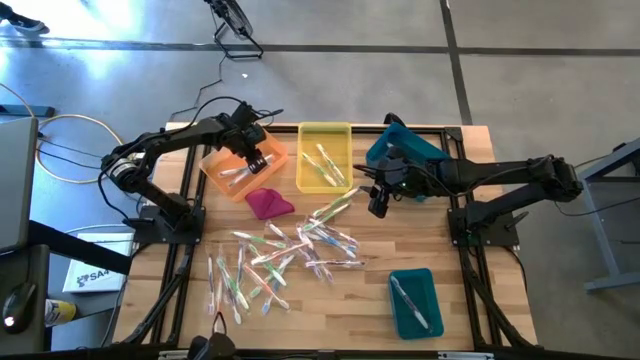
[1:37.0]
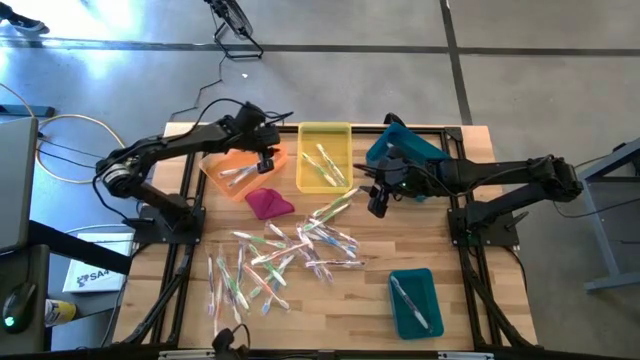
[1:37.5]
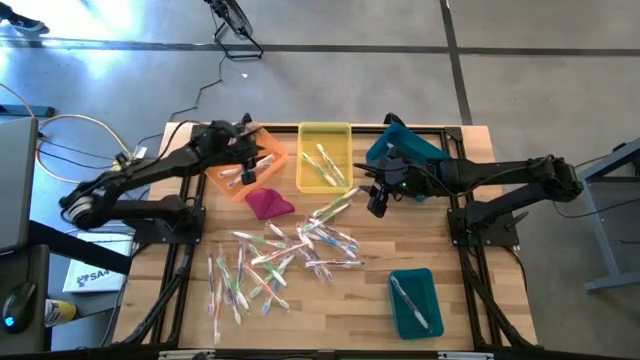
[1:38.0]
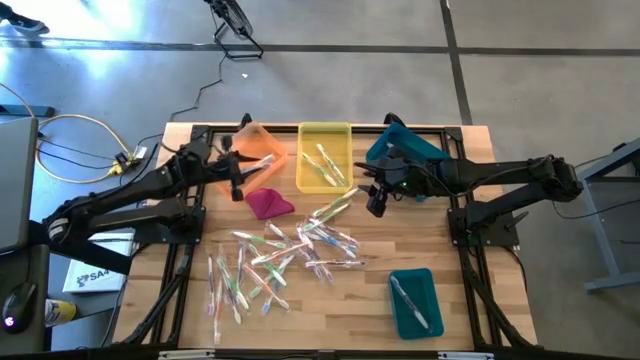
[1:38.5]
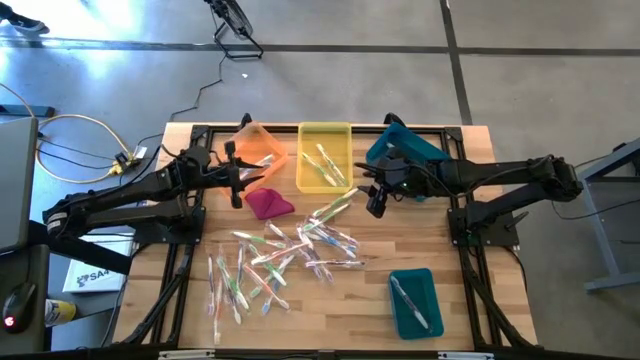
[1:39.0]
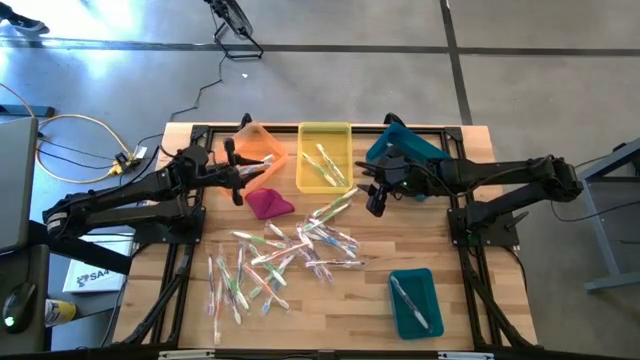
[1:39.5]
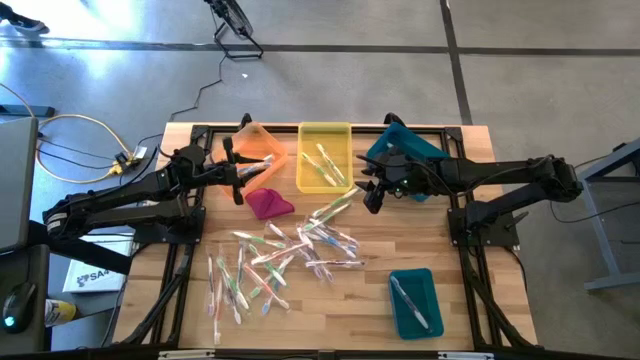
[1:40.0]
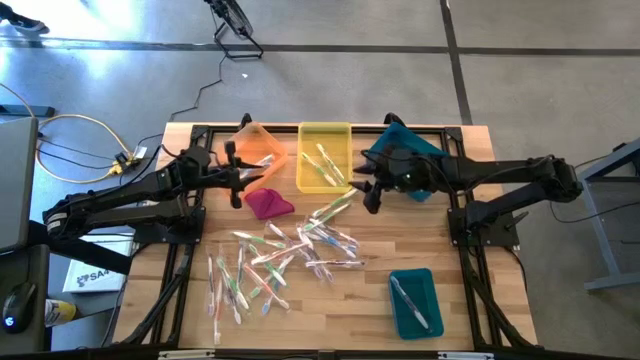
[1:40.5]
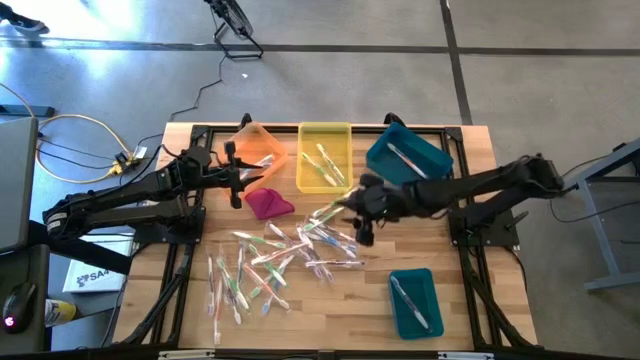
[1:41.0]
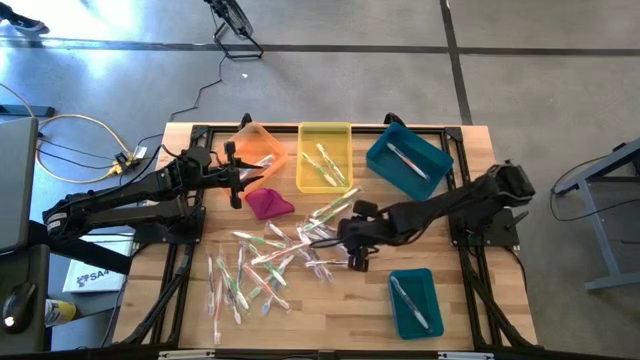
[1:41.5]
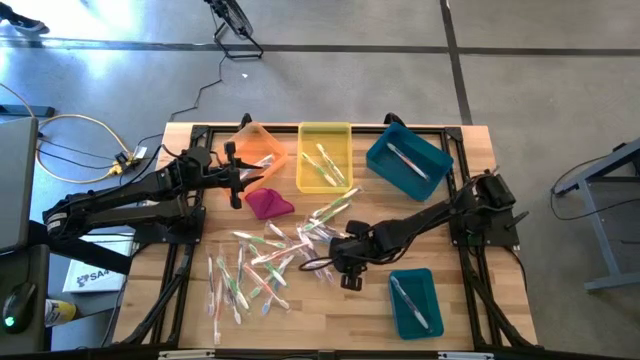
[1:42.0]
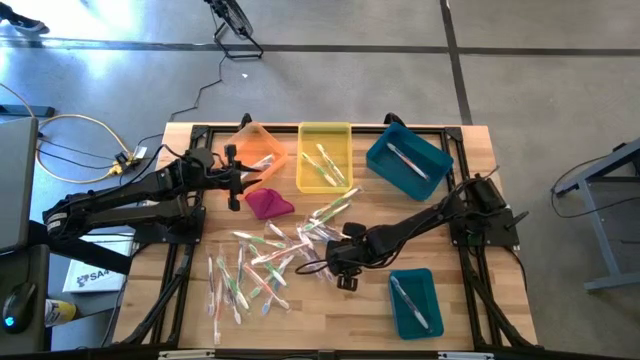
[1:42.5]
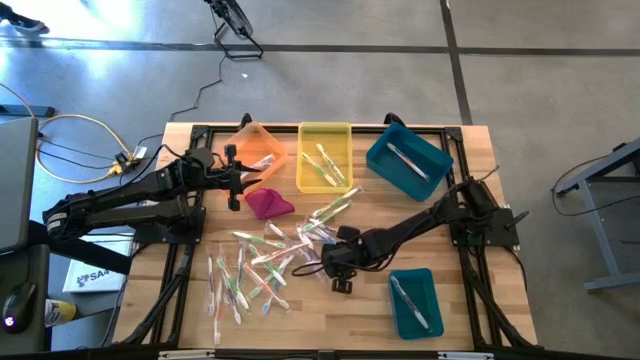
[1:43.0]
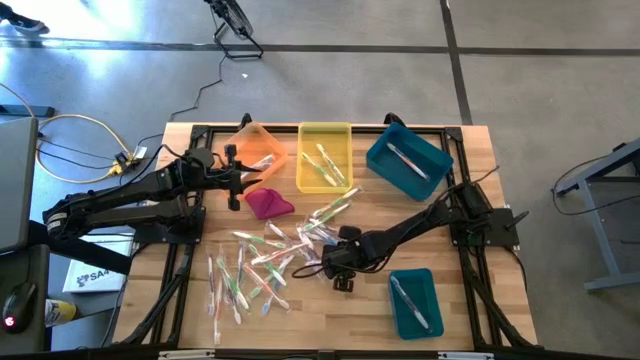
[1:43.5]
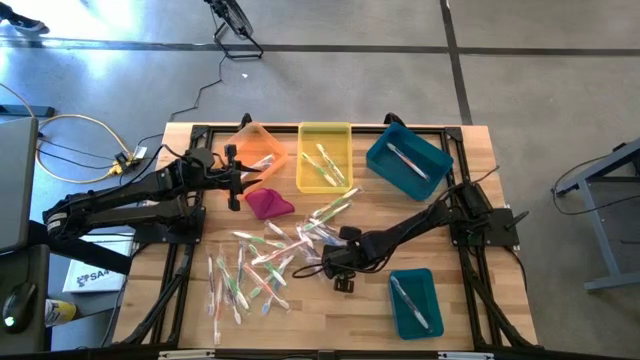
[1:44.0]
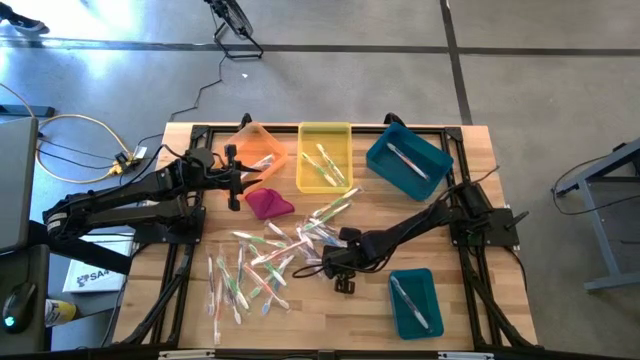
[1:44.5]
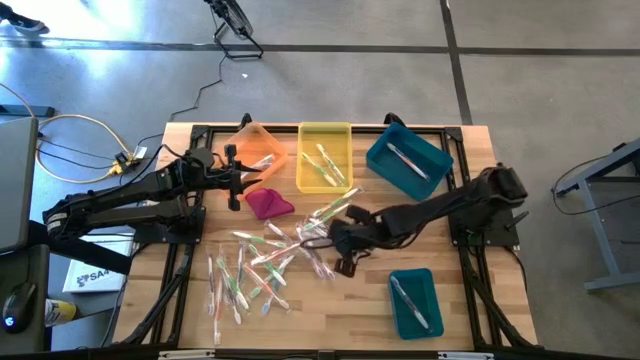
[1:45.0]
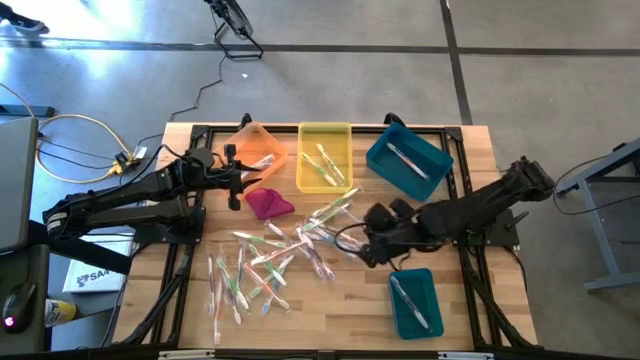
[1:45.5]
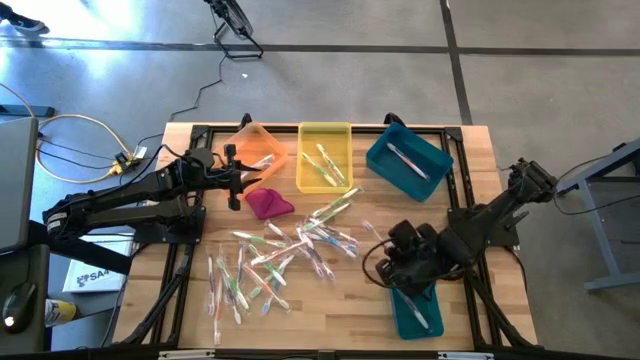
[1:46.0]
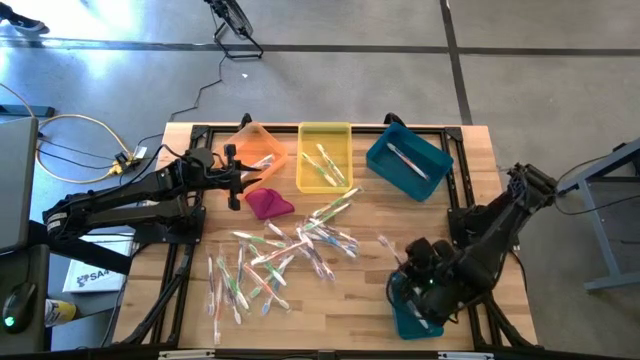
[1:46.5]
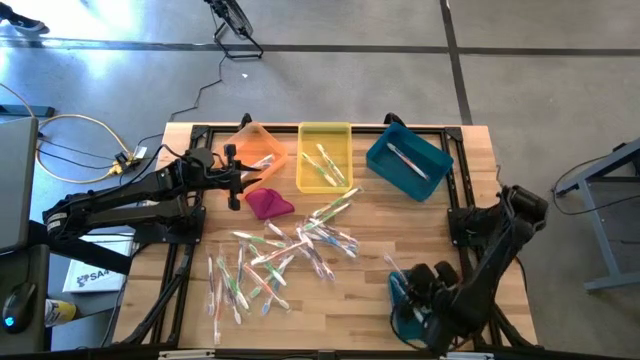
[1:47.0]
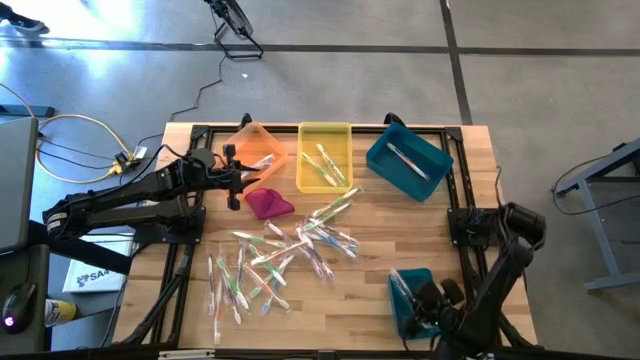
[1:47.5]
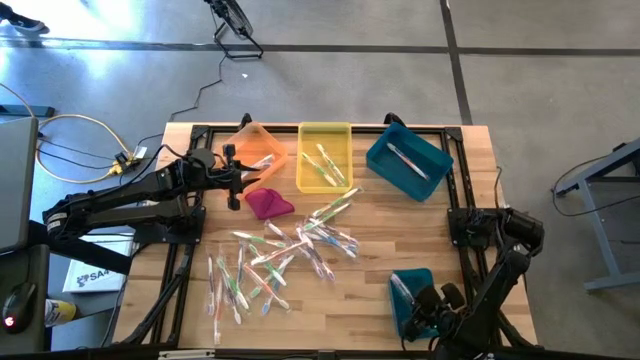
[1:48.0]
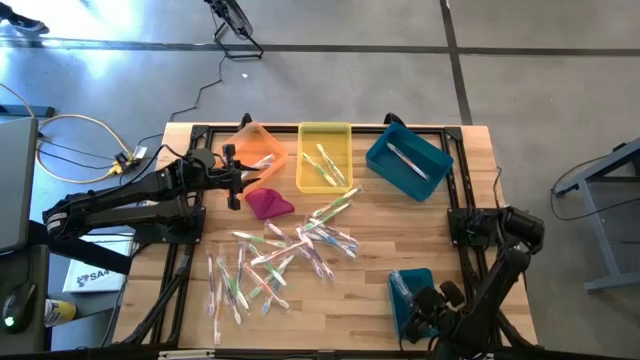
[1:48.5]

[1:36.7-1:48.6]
Task: Pick & Place Toothbrushes
Put the purple toothbrush into the bottom blue bin

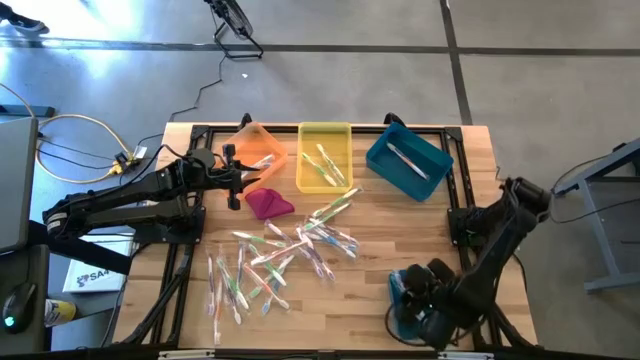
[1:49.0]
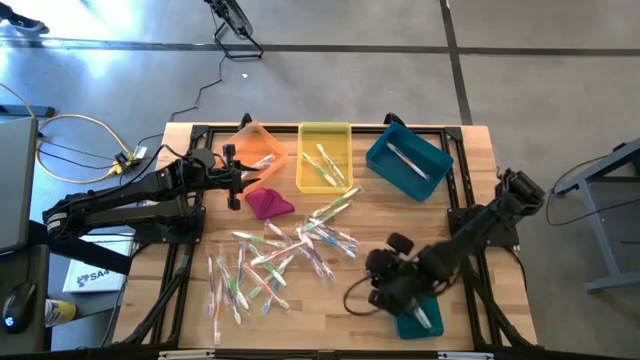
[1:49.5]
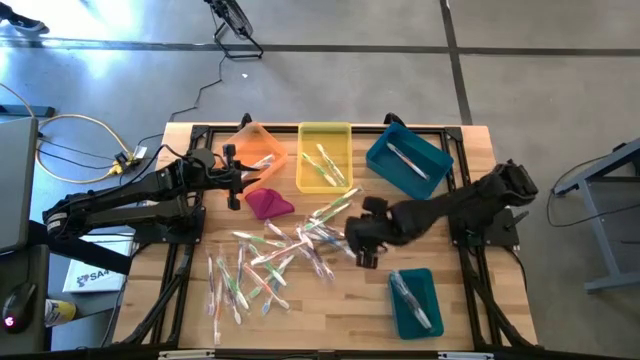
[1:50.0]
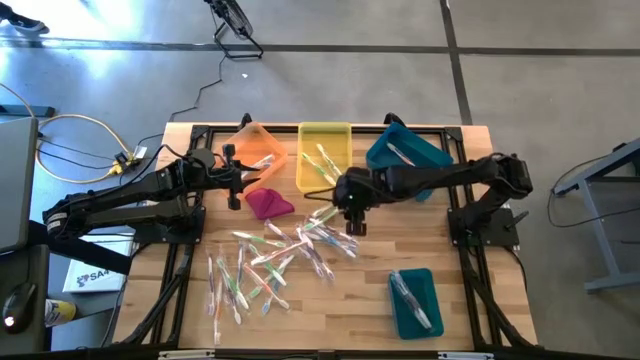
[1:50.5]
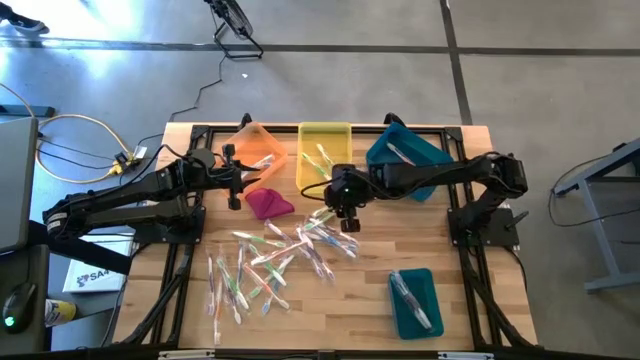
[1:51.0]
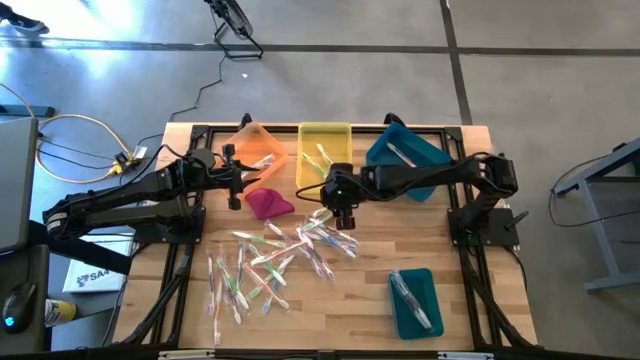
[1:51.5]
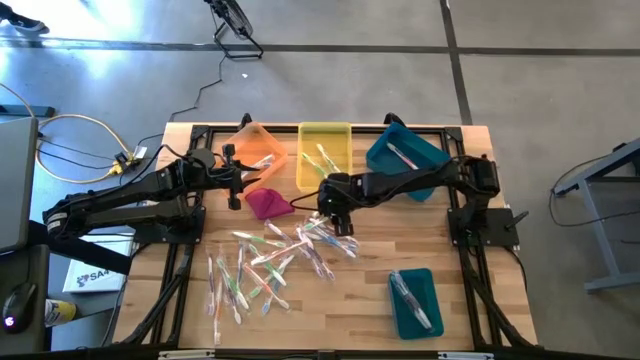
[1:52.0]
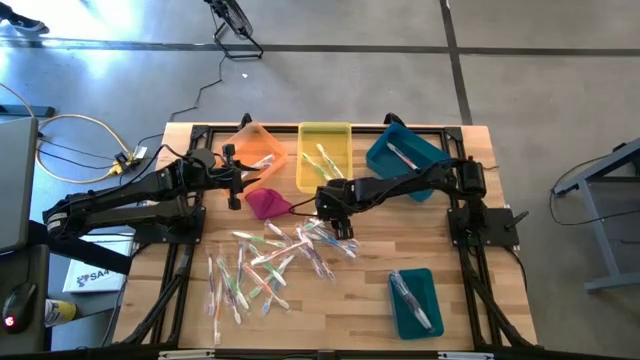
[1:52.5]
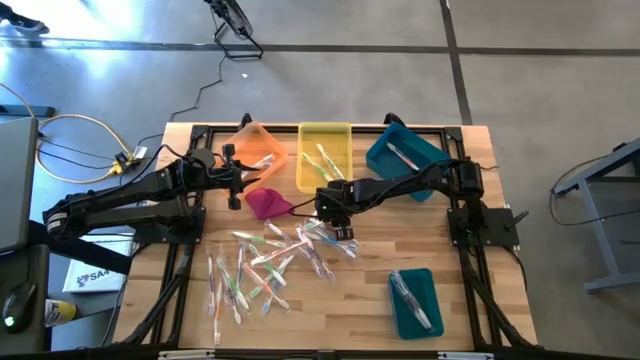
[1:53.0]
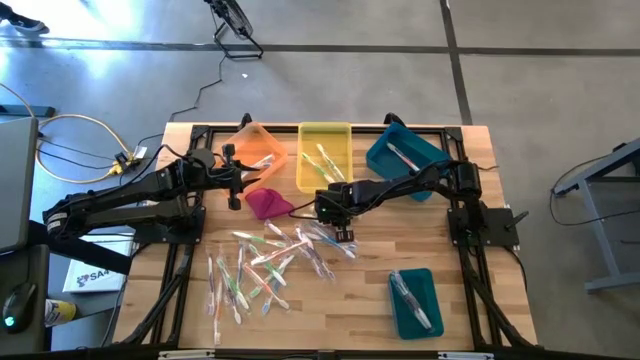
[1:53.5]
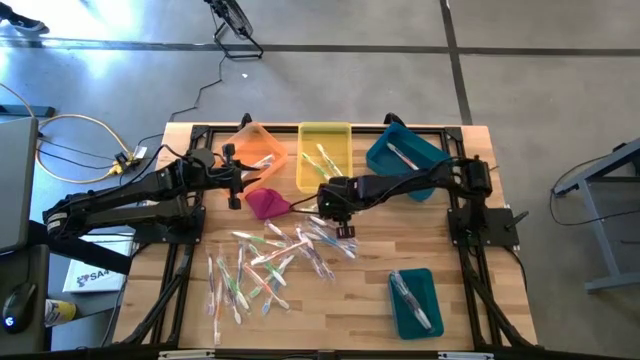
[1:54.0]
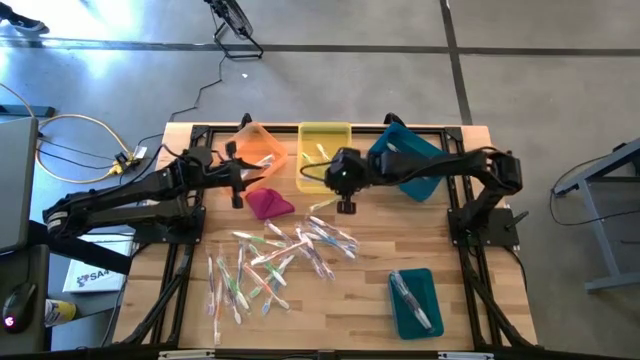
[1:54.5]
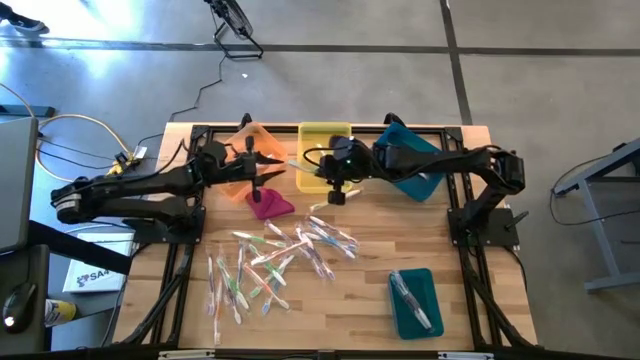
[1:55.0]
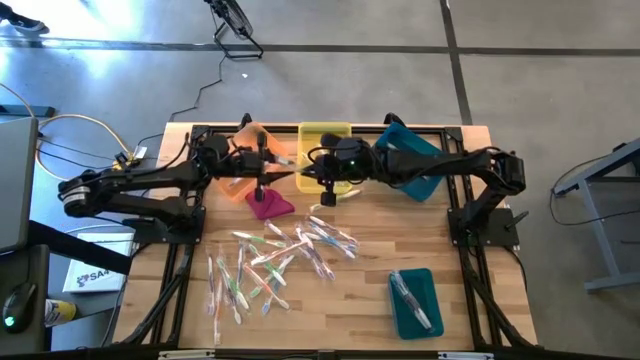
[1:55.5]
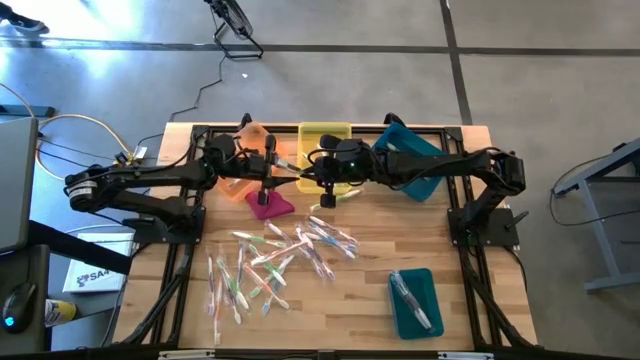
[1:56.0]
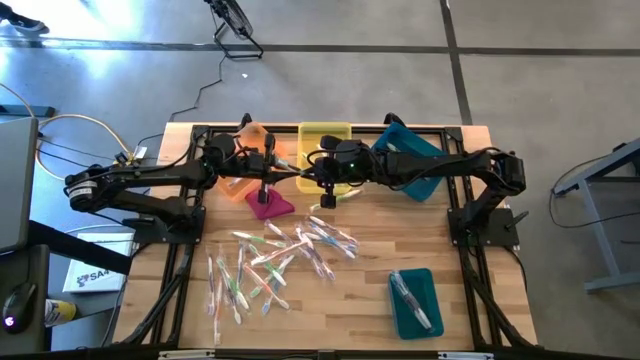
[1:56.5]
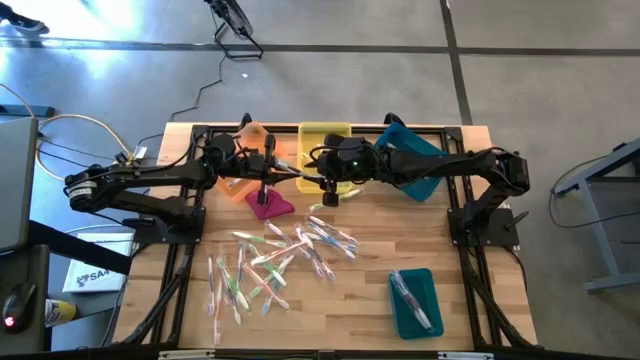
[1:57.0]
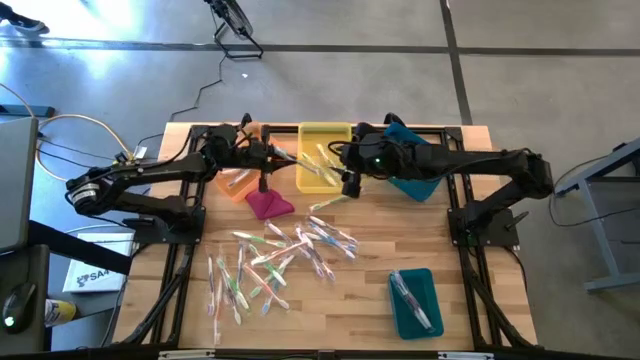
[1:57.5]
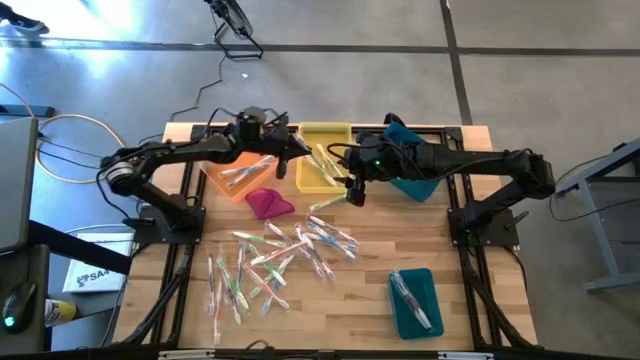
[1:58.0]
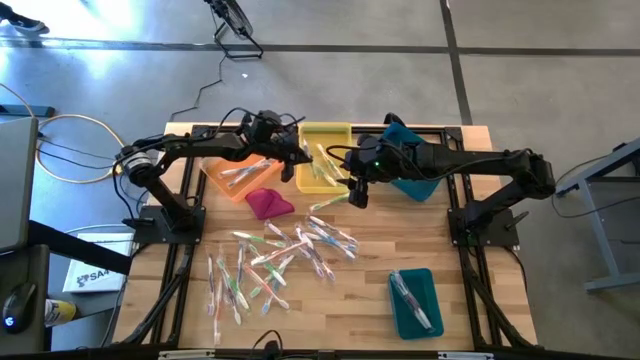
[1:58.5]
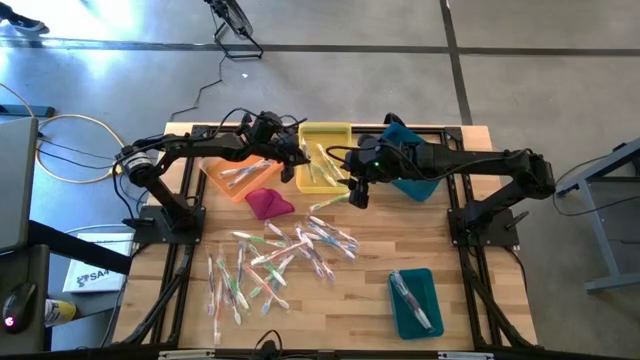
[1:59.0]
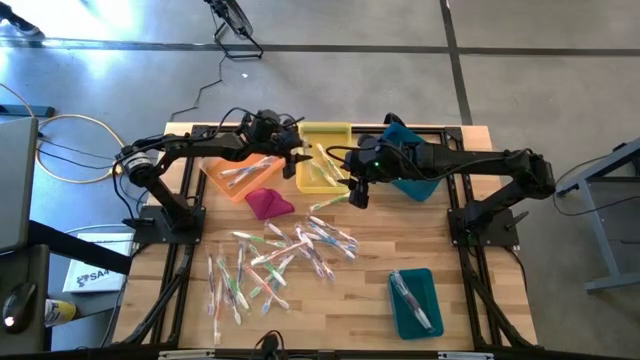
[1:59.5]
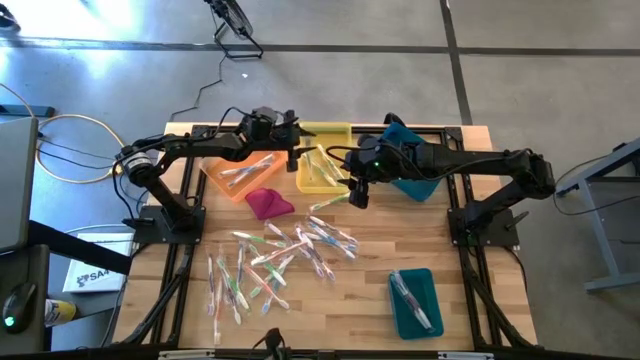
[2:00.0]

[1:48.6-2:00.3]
Put the green toothbrush into the yellow bin
